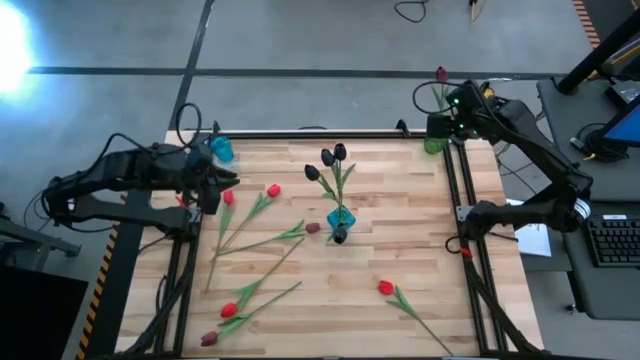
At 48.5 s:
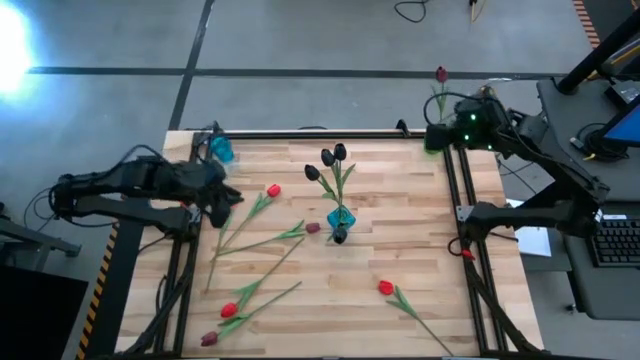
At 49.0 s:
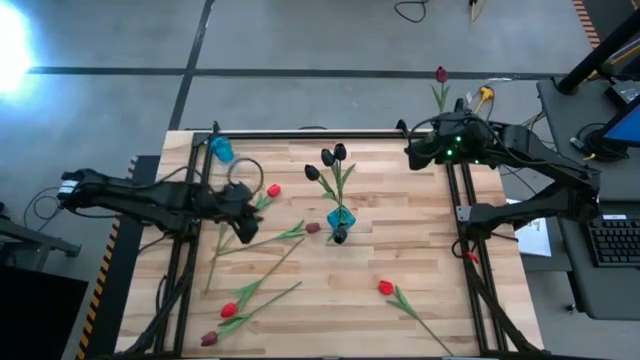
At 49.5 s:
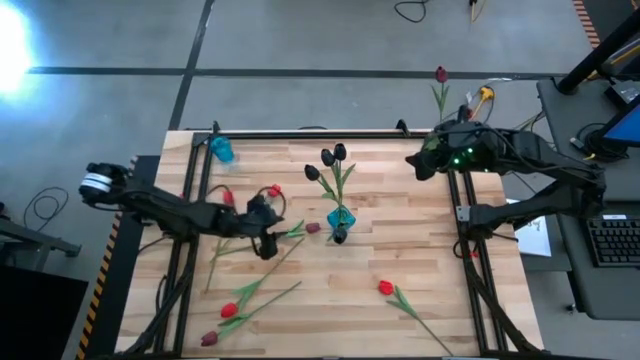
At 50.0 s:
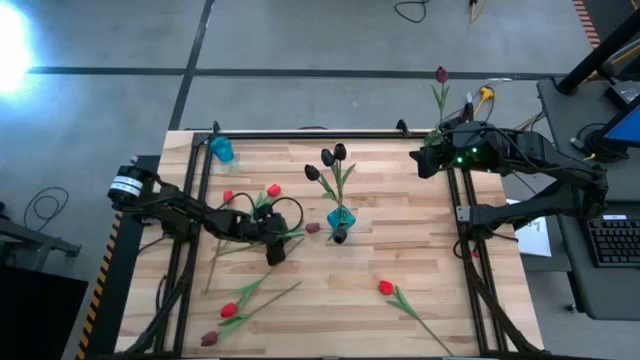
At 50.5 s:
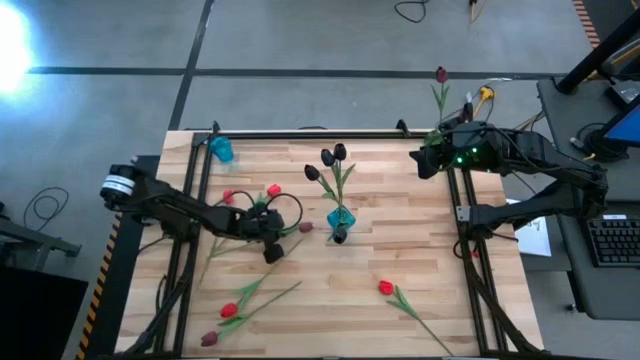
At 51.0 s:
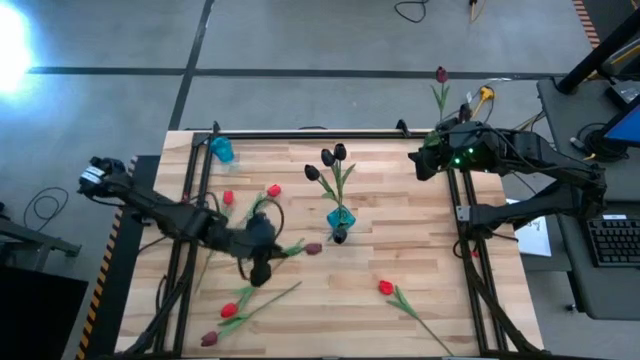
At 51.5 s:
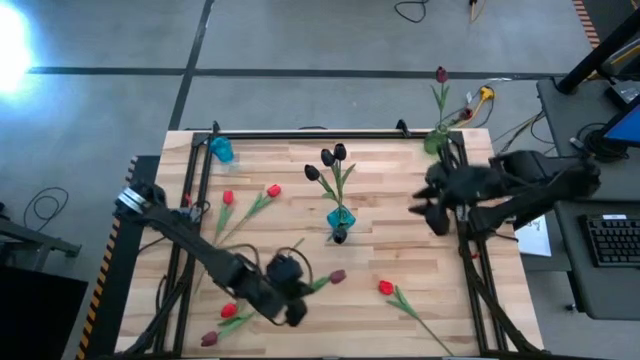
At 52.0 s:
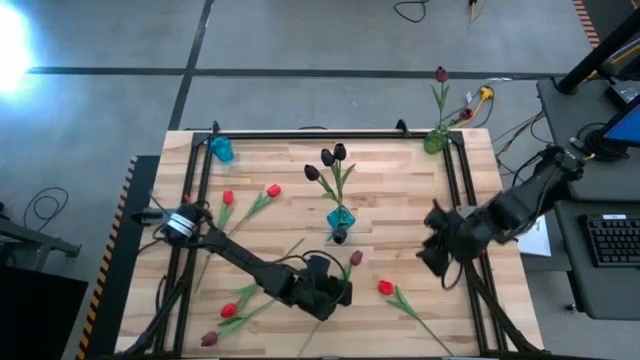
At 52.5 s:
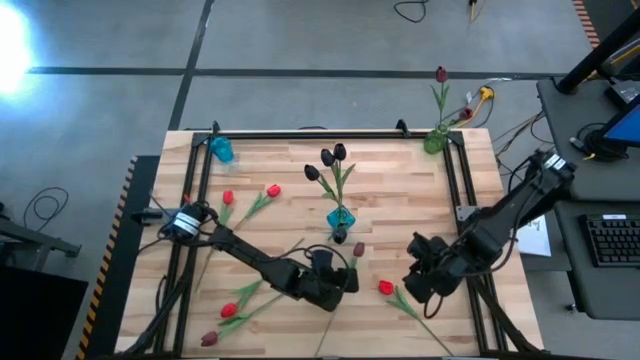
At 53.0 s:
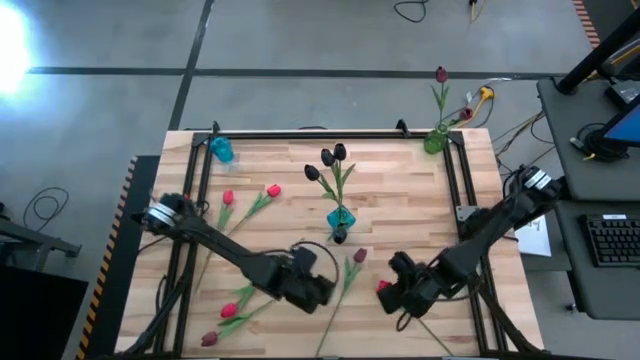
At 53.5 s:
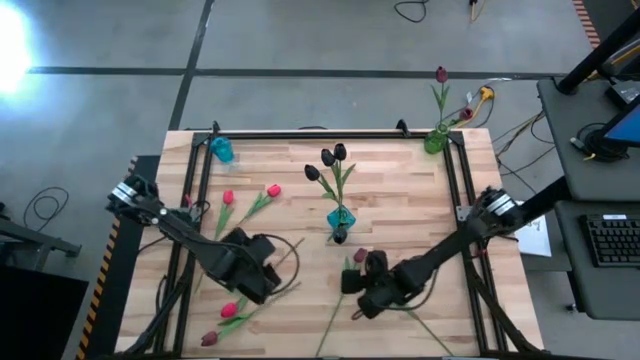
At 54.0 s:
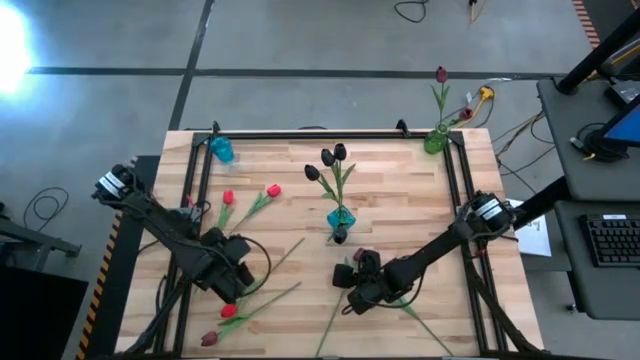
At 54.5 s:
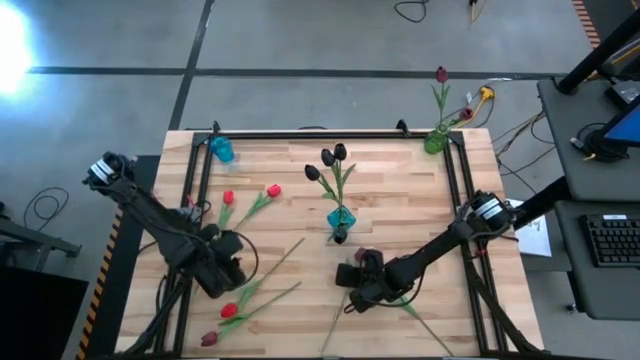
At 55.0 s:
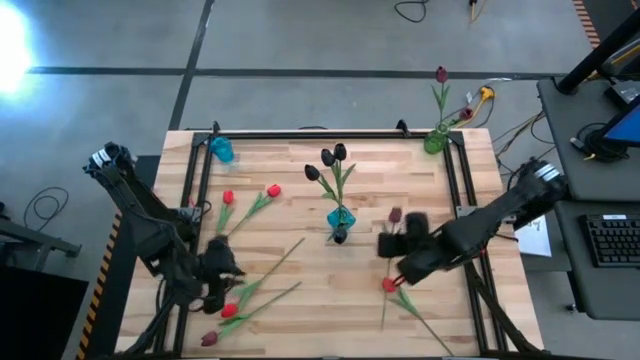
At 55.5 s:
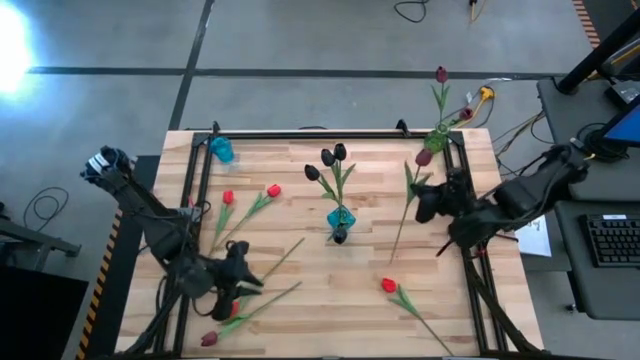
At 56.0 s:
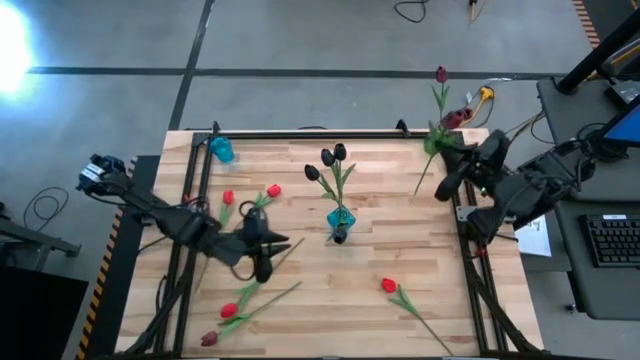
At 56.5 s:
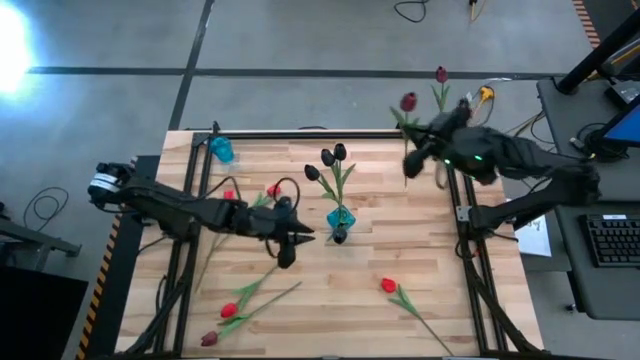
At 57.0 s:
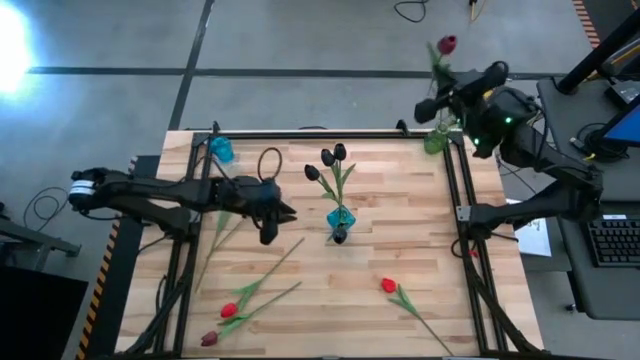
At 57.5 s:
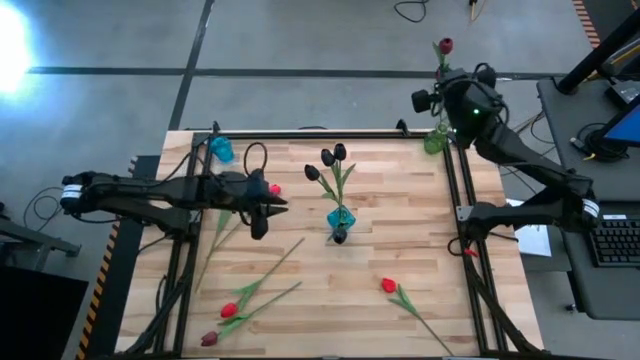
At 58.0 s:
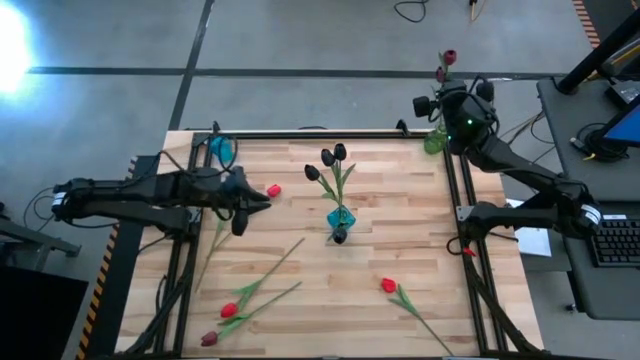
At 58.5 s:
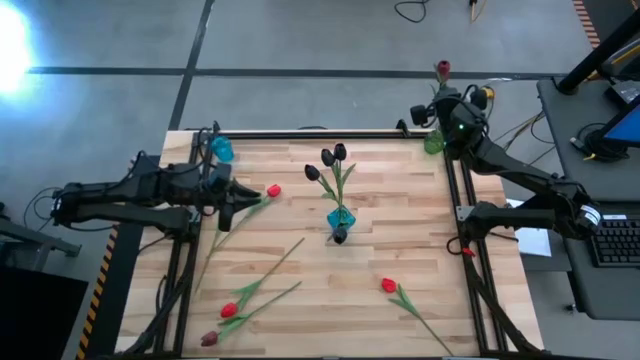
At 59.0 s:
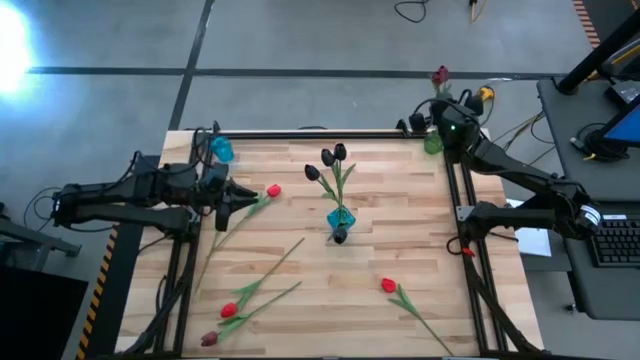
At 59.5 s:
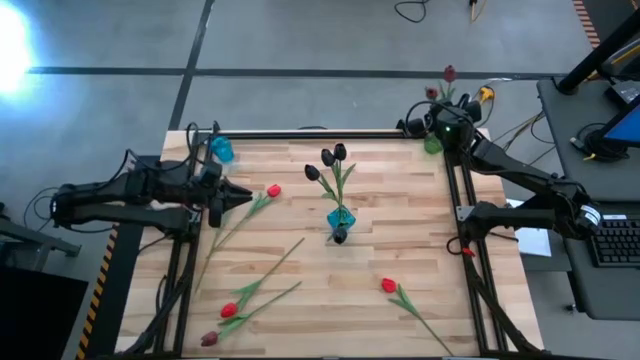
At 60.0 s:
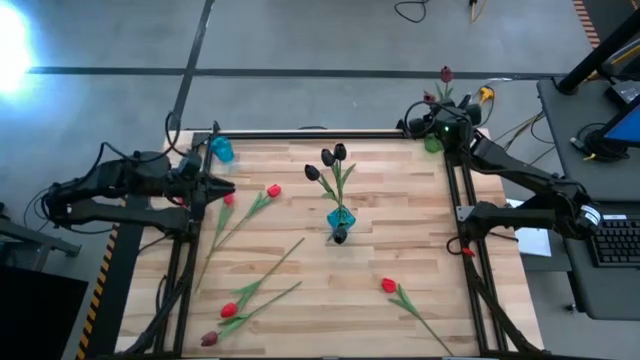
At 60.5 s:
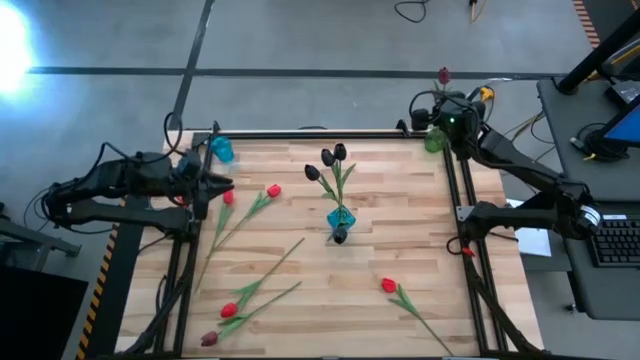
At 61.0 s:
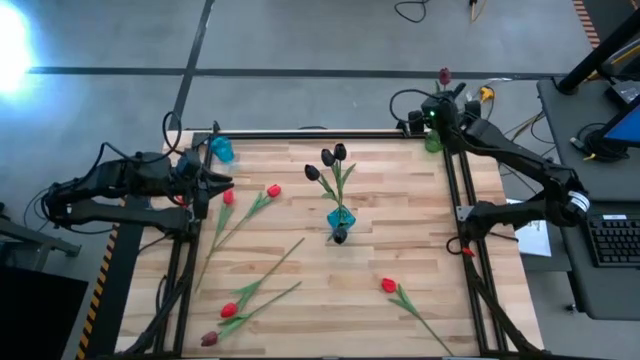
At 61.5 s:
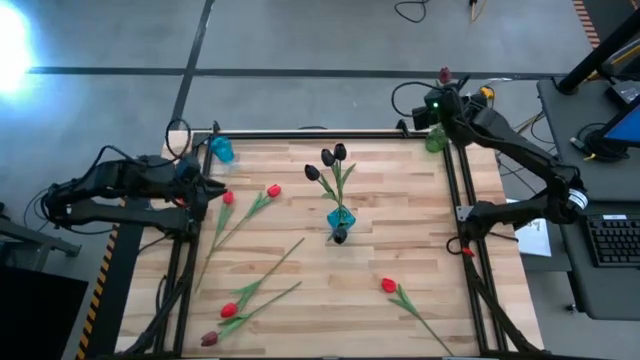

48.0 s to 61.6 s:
Task: Sort flowers into vase by color
Put the dark red flower into the green vase

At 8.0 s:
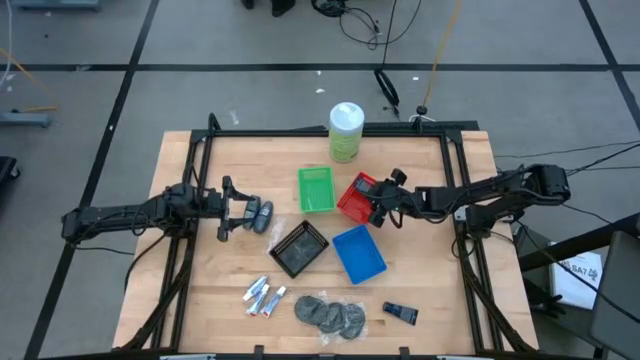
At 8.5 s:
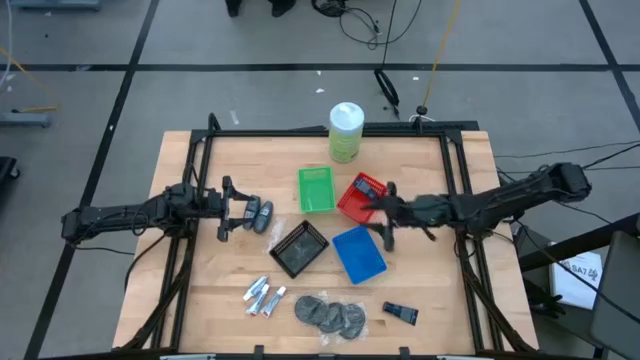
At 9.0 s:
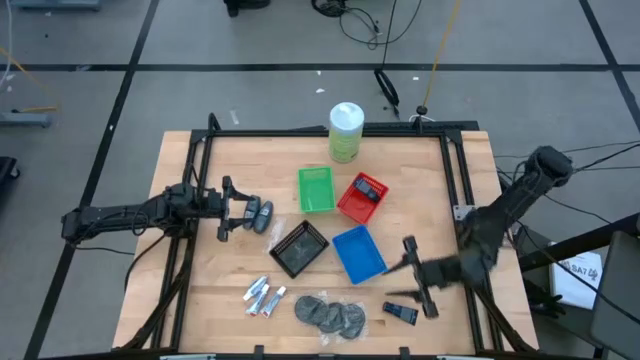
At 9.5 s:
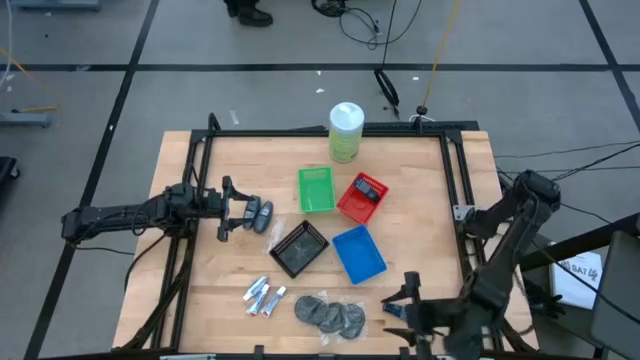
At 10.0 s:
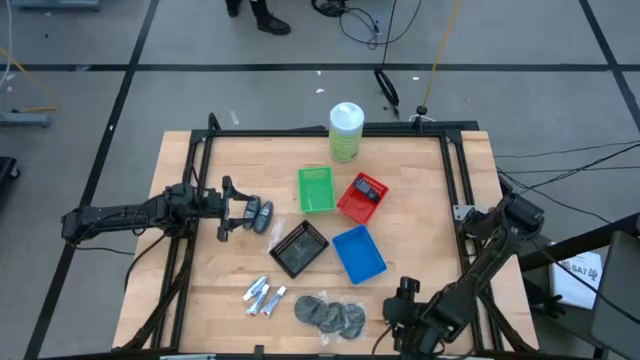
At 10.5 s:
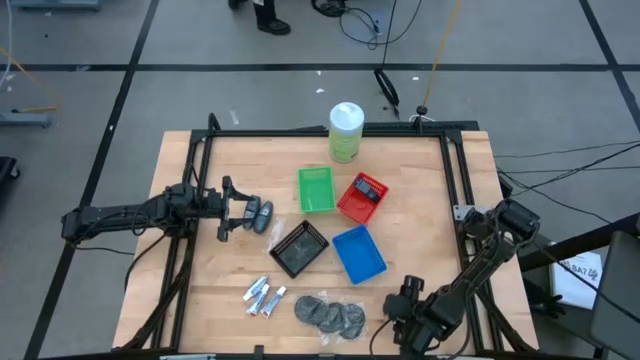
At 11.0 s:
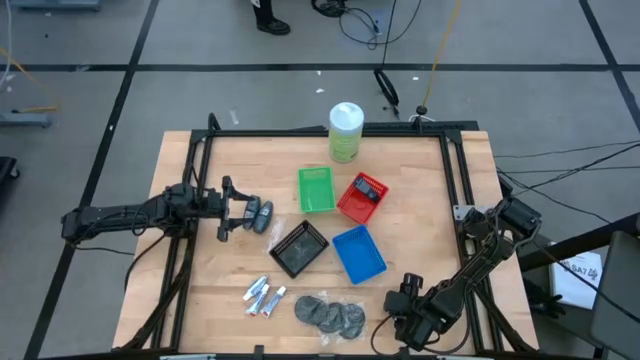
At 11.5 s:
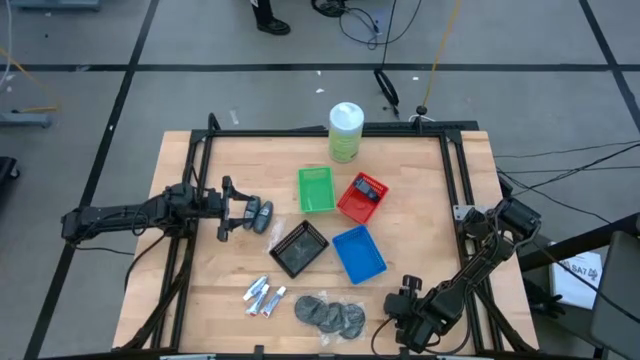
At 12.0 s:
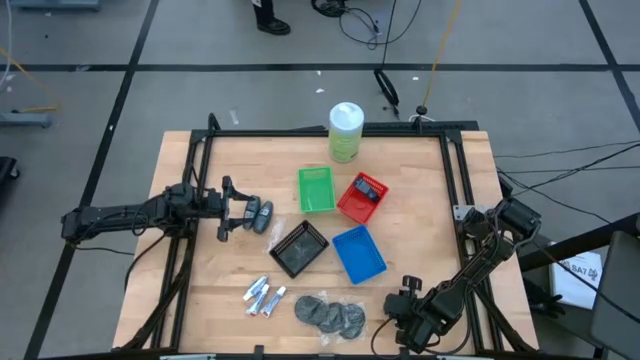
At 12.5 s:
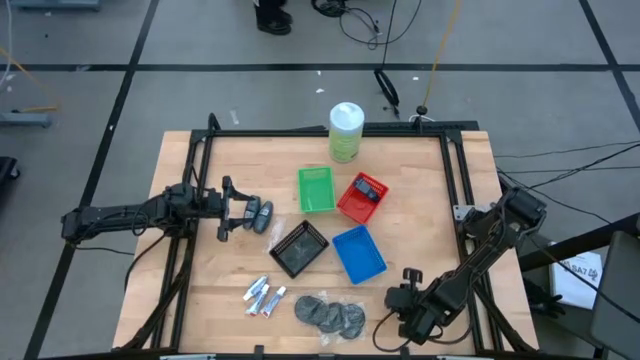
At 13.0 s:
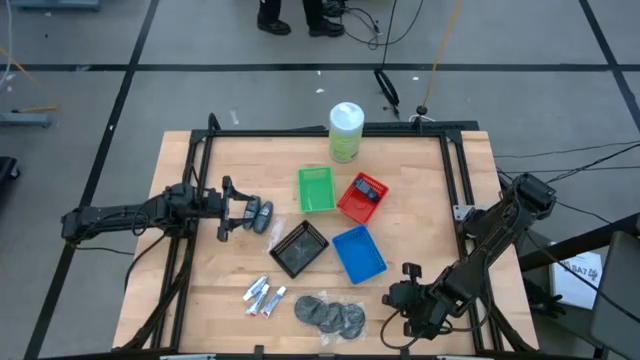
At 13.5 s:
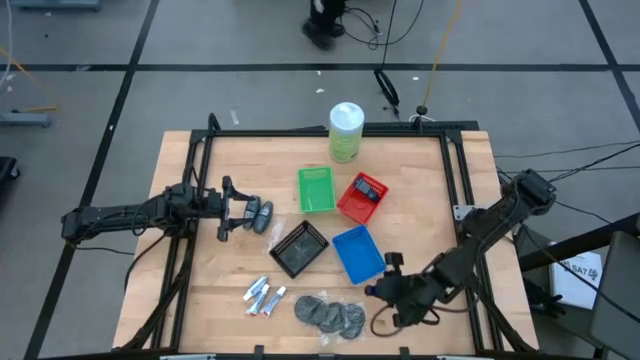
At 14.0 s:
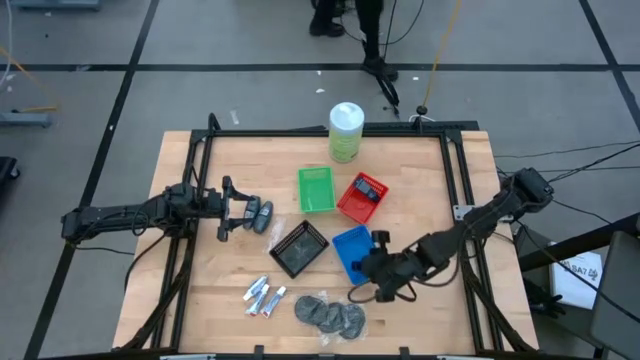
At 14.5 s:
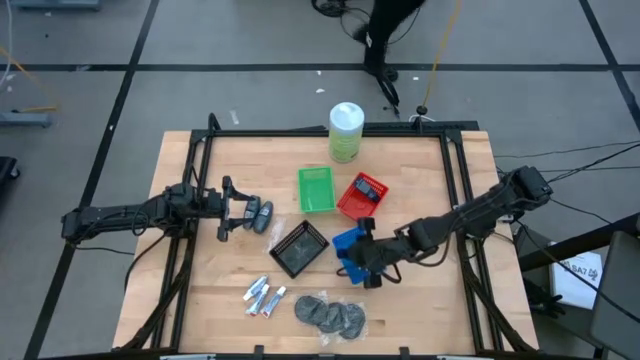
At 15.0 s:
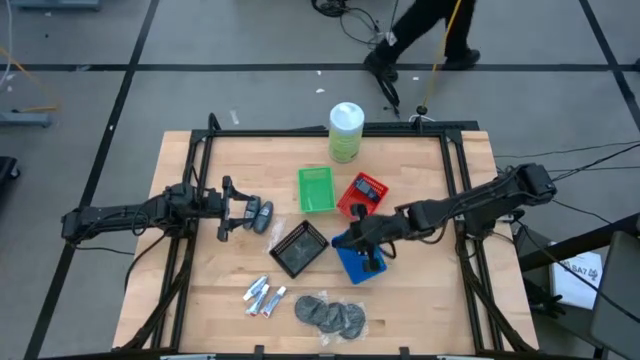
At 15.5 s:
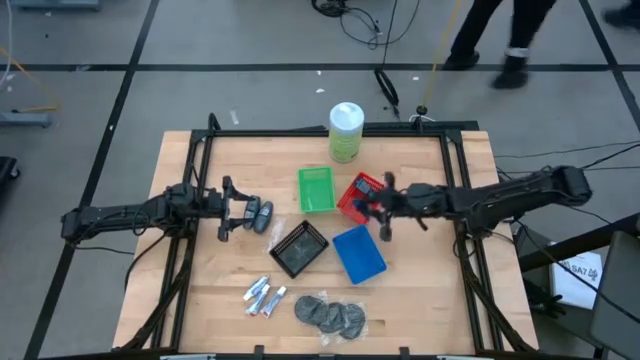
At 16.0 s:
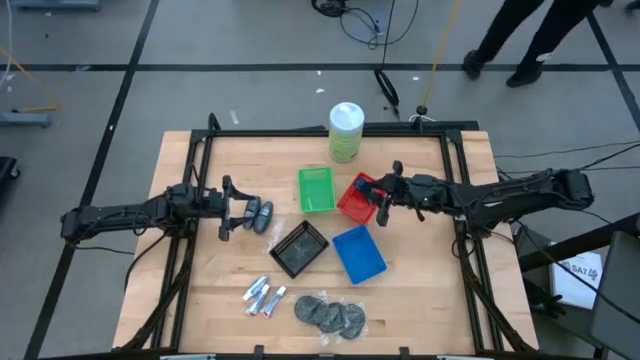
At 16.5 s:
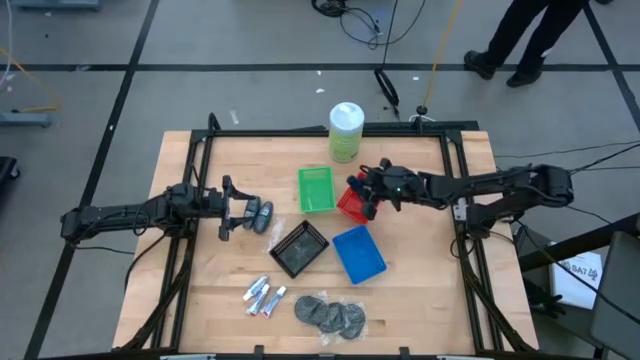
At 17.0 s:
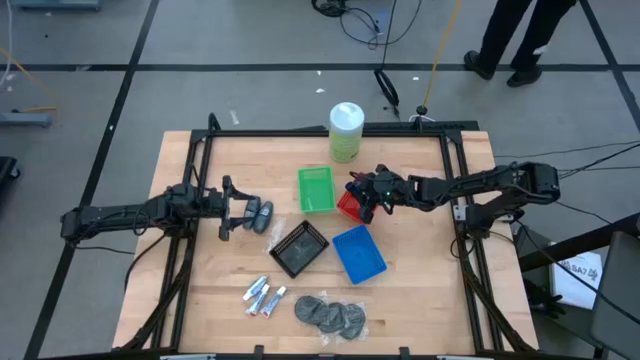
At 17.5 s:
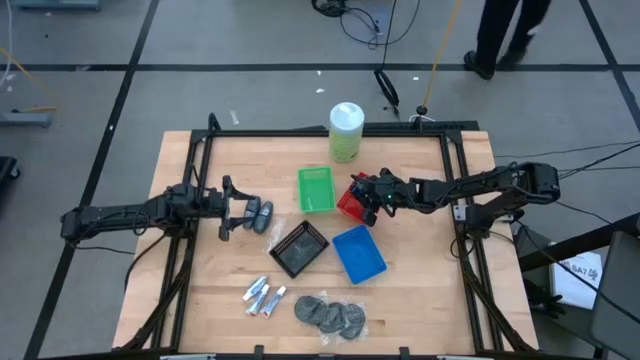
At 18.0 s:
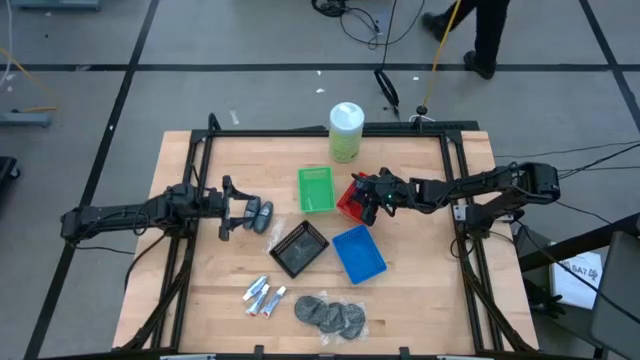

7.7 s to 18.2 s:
Task: Pick & Place Travel size toiletries
Put the blue shaving cream into the red bin
